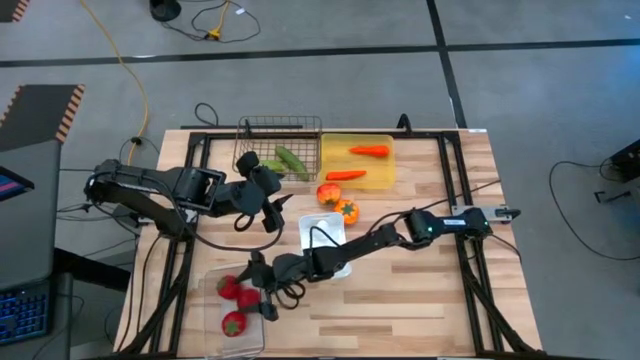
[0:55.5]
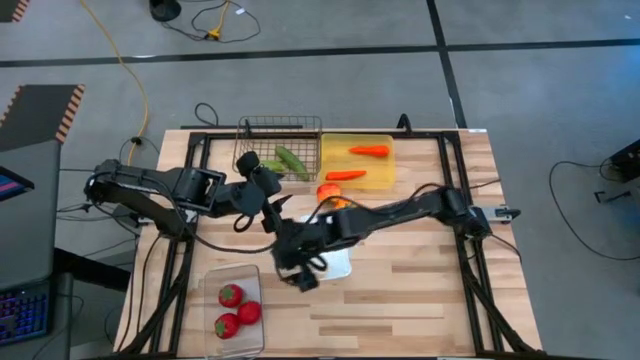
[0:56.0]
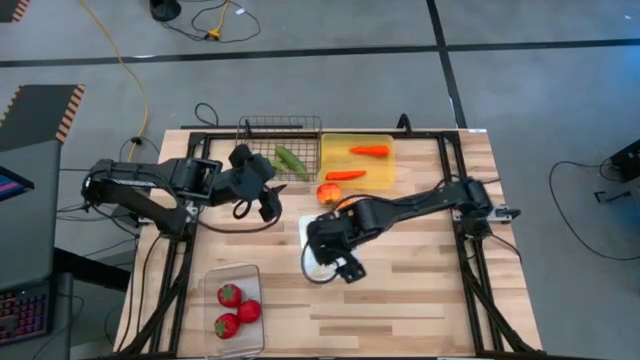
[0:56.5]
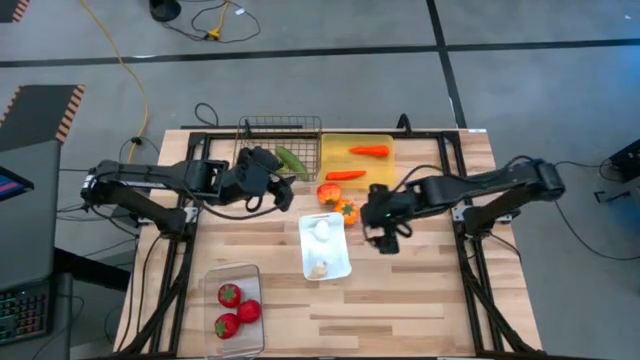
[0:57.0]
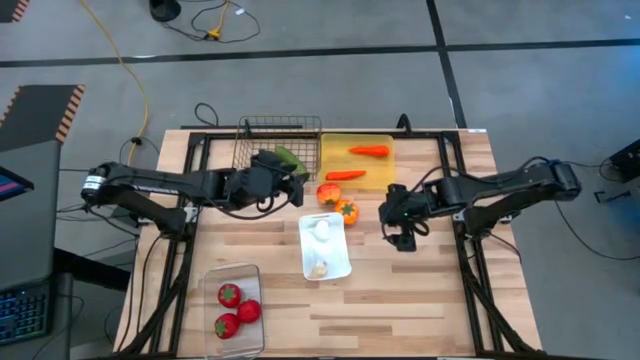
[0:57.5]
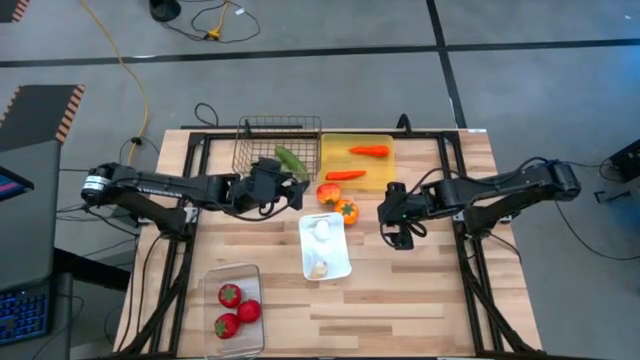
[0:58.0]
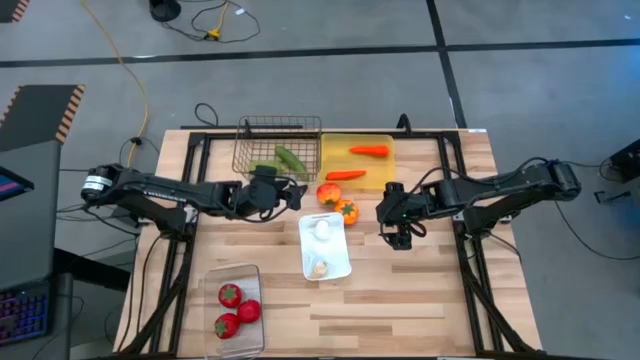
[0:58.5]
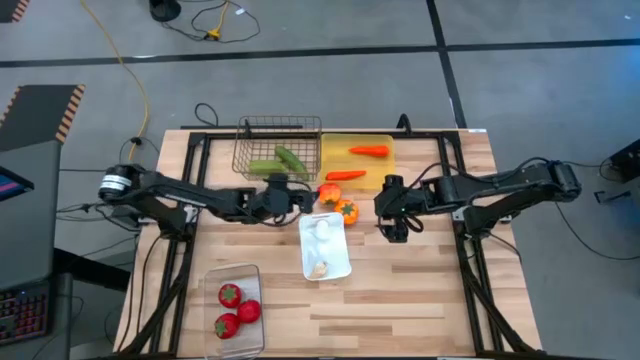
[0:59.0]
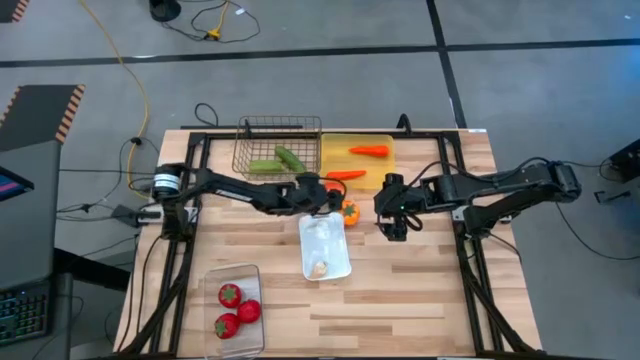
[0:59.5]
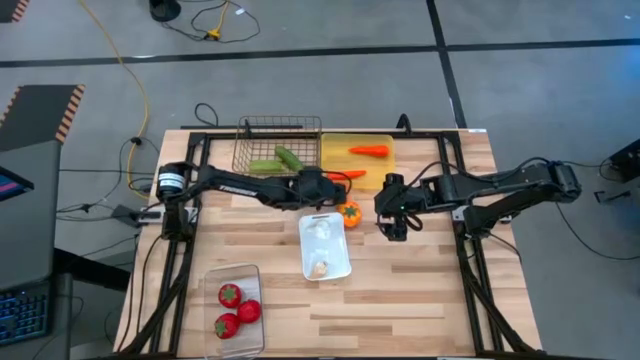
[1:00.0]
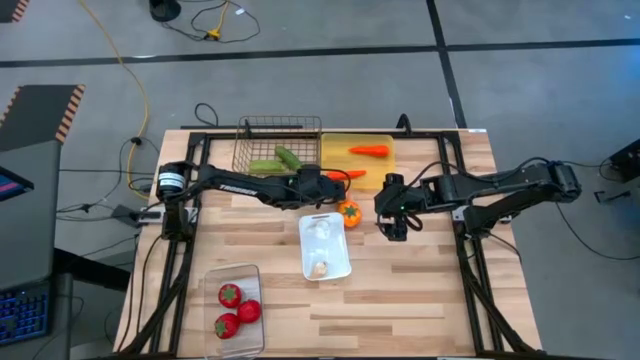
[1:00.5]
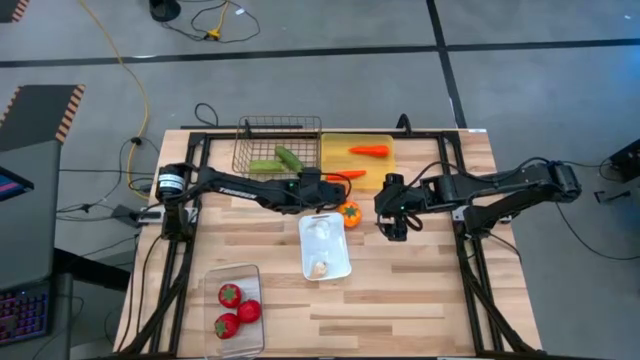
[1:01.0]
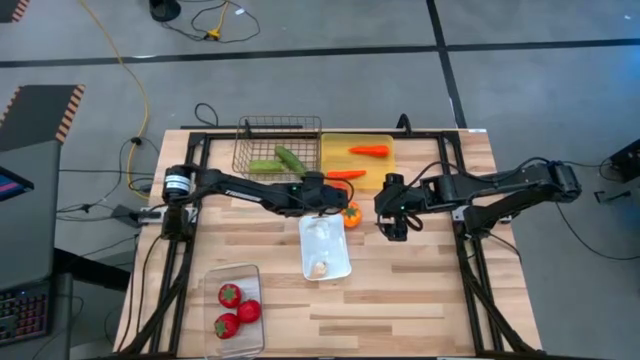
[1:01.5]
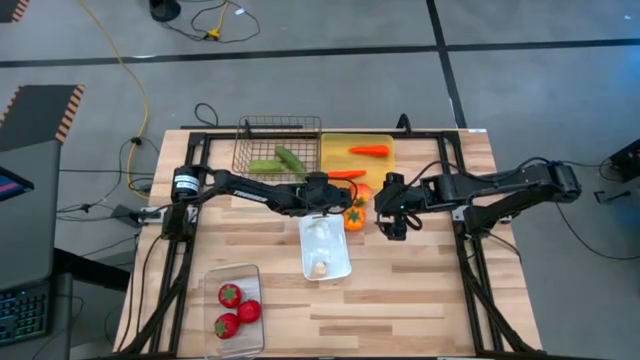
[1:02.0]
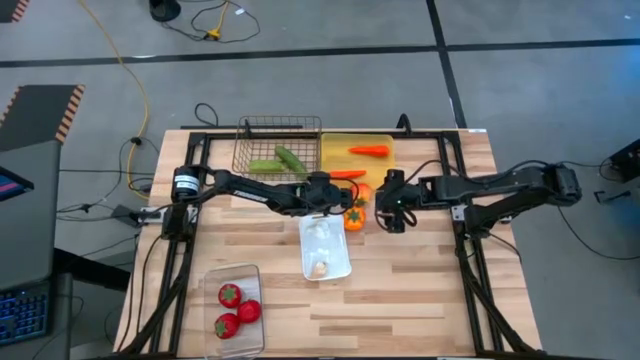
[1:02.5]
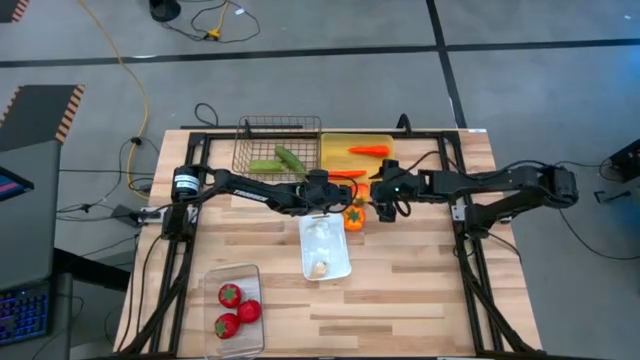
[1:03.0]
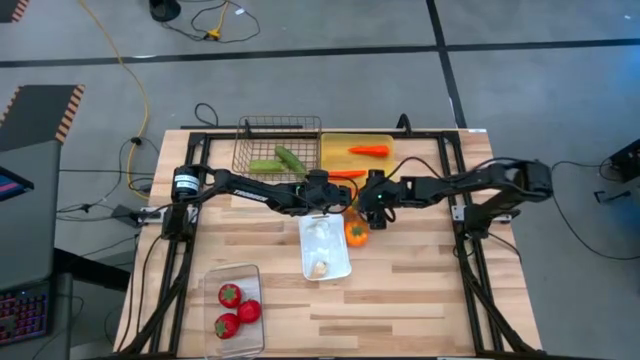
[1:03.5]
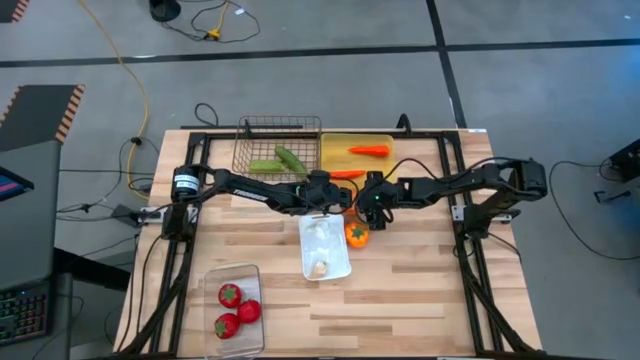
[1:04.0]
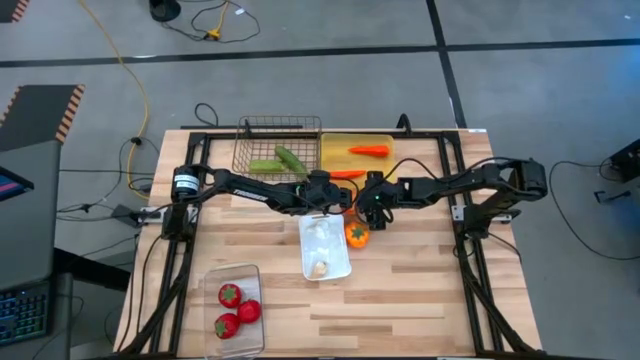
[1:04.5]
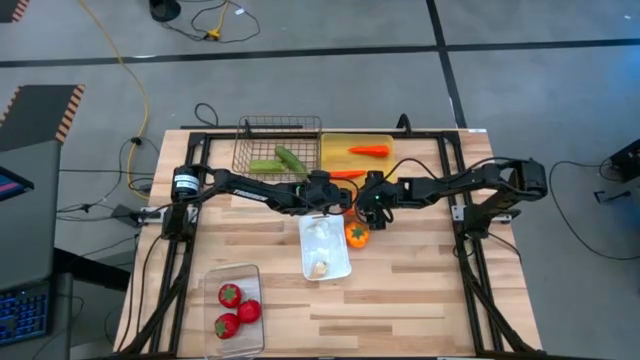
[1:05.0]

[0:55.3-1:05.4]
Task: Sort produce into baskets
Put the top orange tomato into the transparent bin

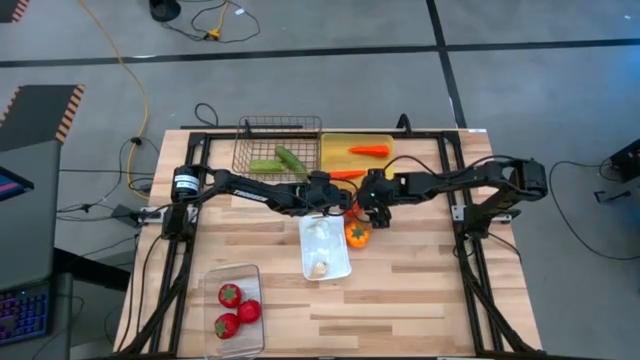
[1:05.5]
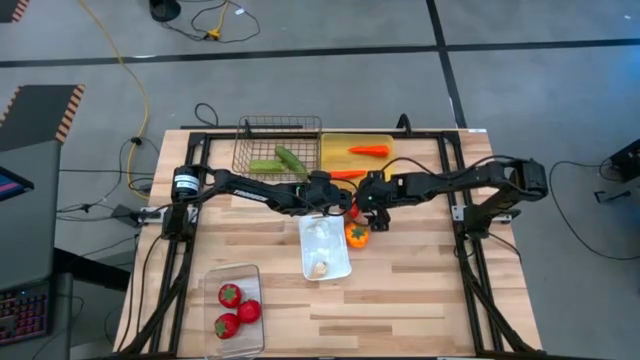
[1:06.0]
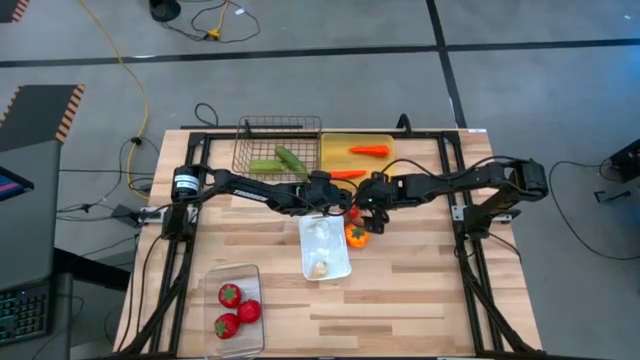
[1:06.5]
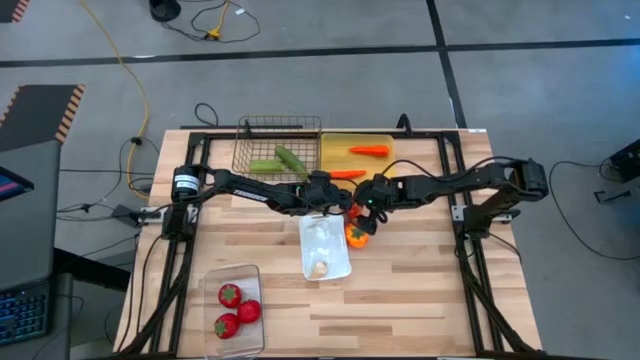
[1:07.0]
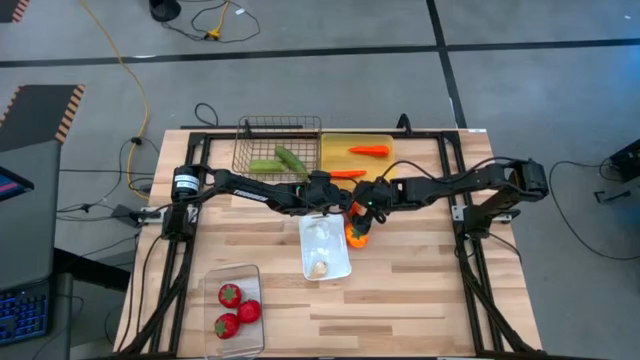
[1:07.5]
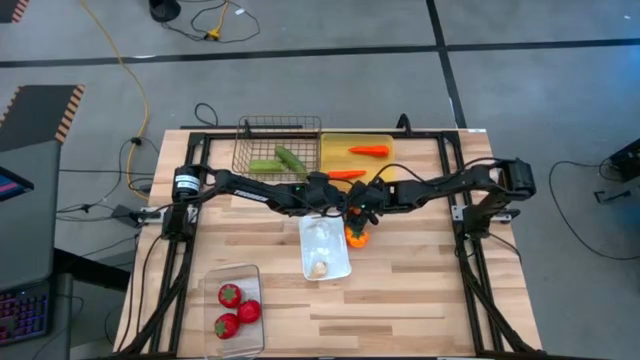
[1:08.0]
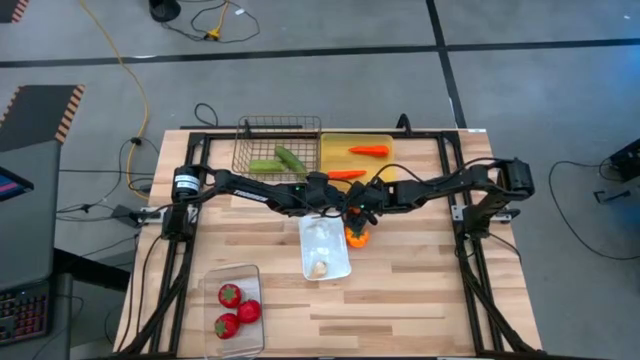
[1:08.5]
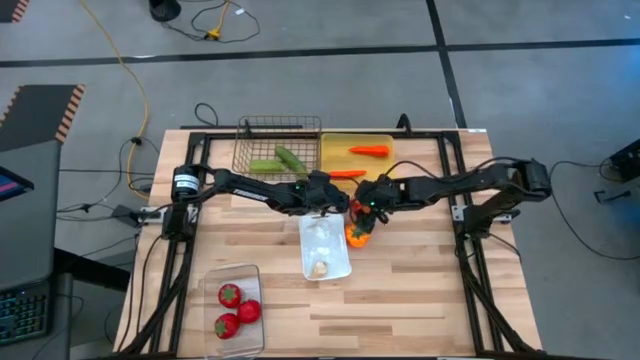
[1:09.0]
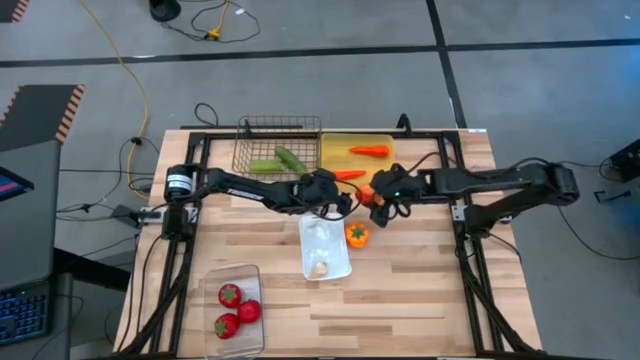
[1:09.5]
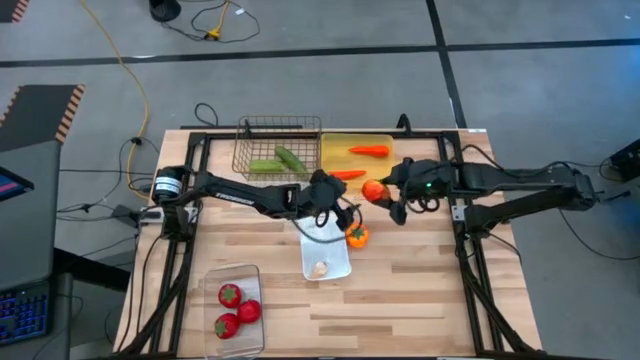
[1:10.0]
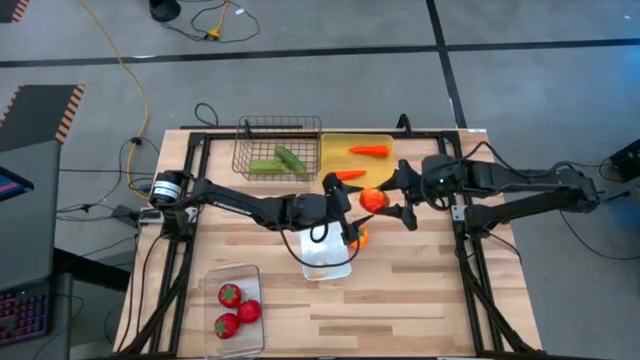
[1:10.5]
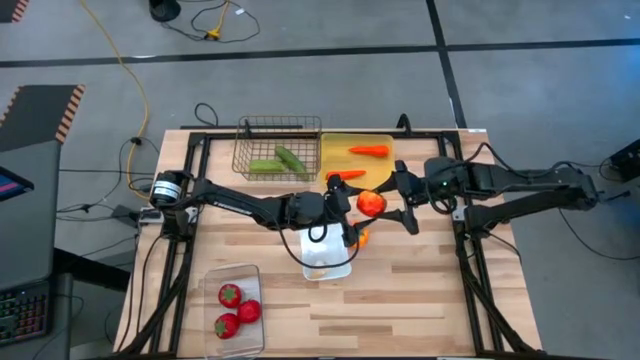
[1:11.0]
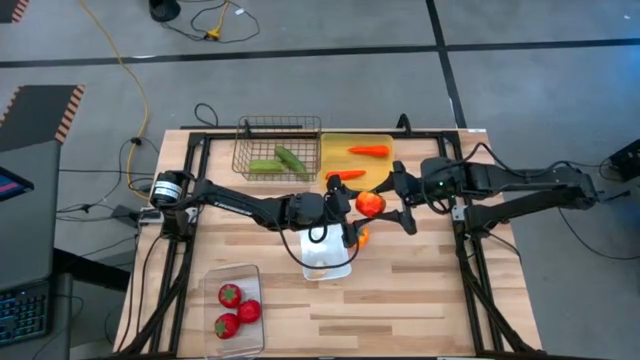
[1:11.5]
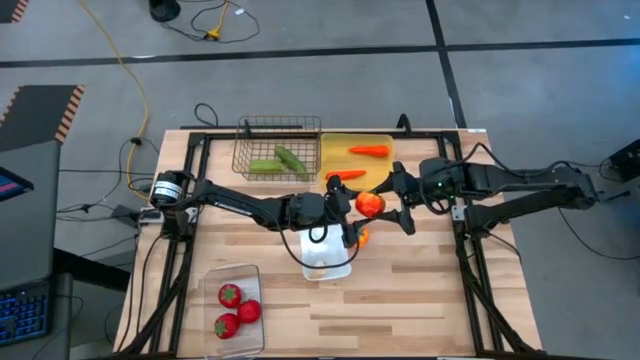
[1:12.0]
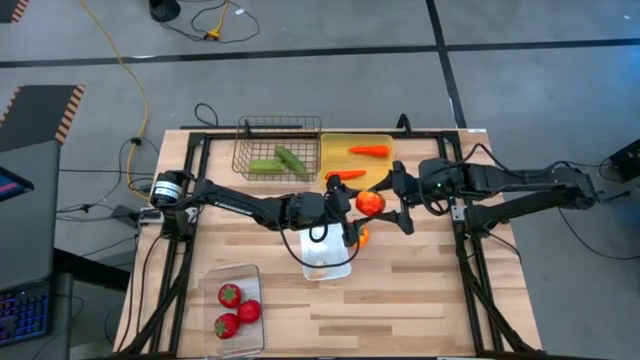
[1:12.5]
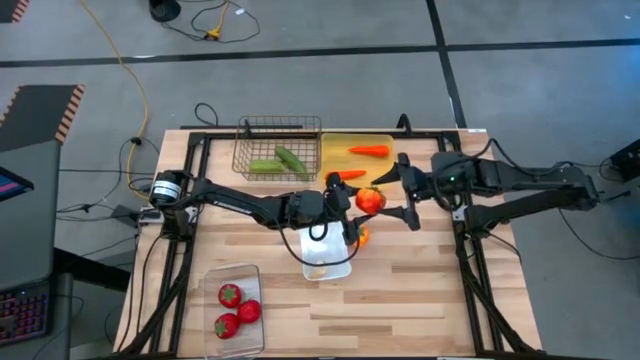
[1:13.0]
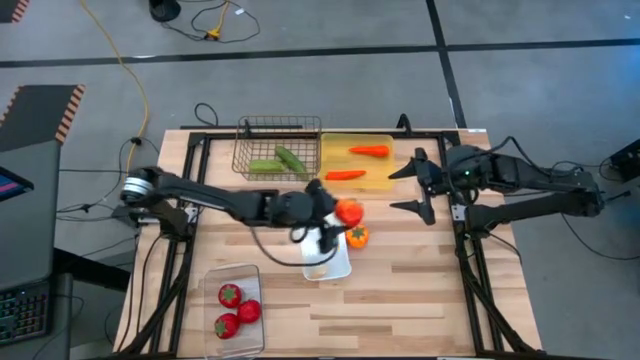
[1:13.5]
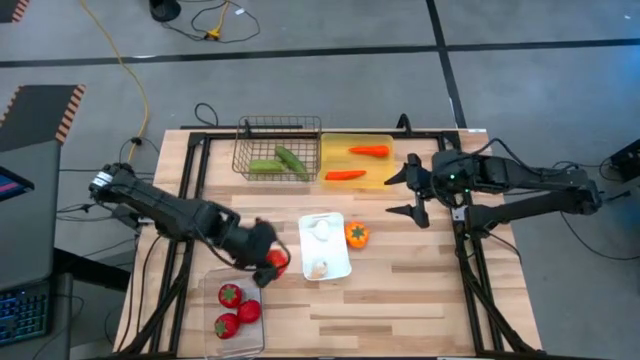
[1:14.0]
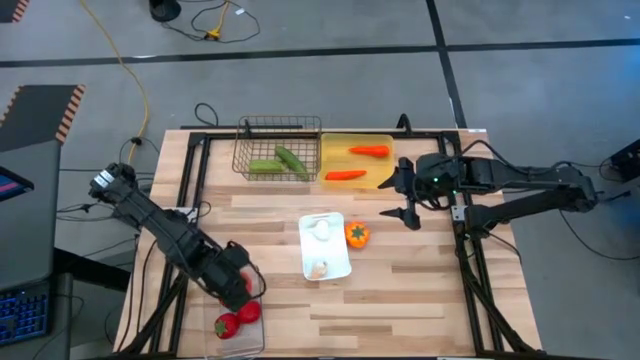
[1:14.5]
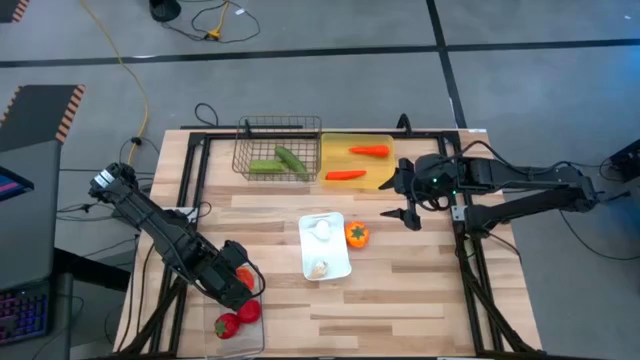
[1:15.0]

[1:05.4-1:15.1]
Put the top orange tomato into the transparent bin

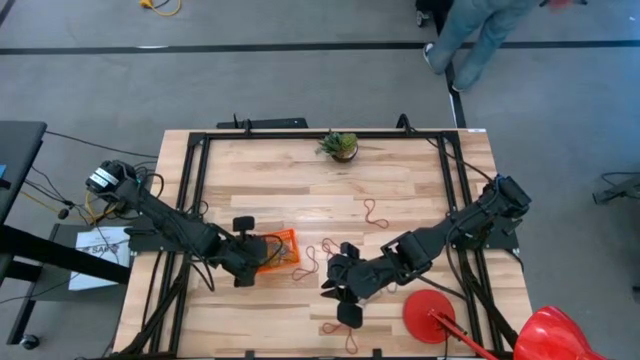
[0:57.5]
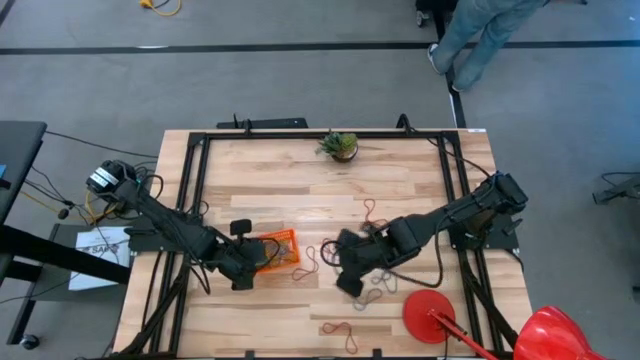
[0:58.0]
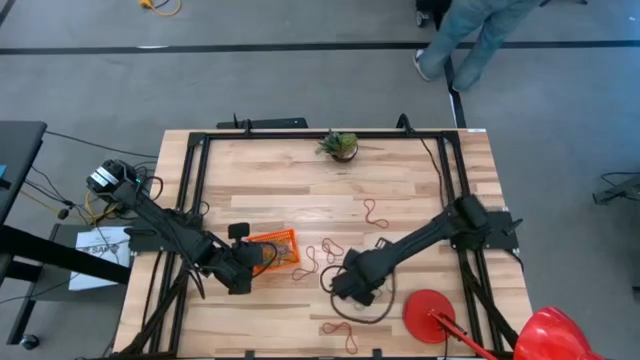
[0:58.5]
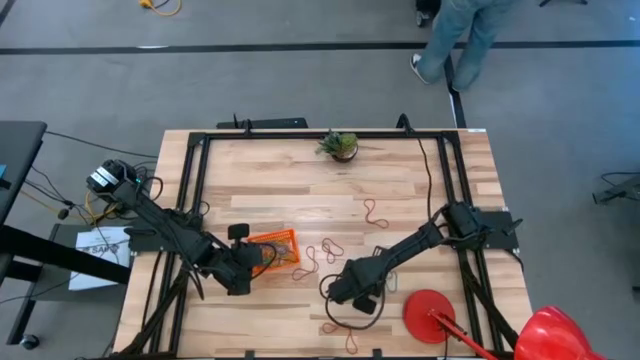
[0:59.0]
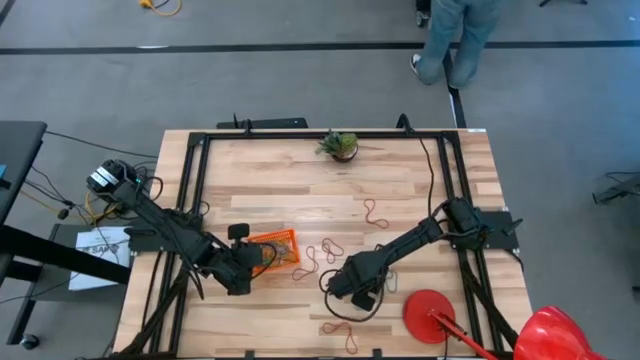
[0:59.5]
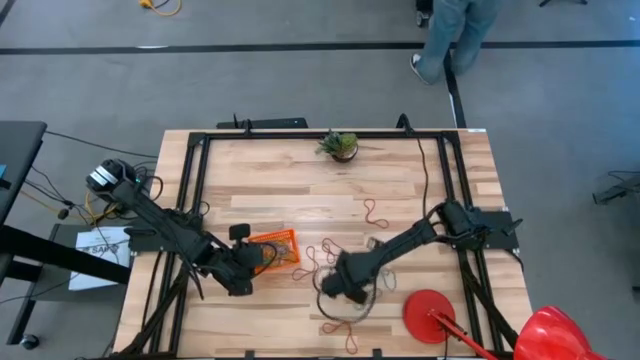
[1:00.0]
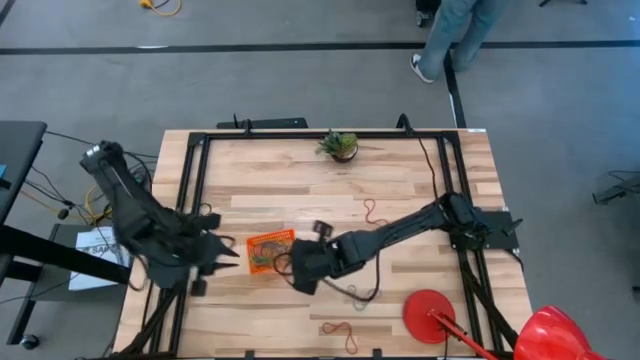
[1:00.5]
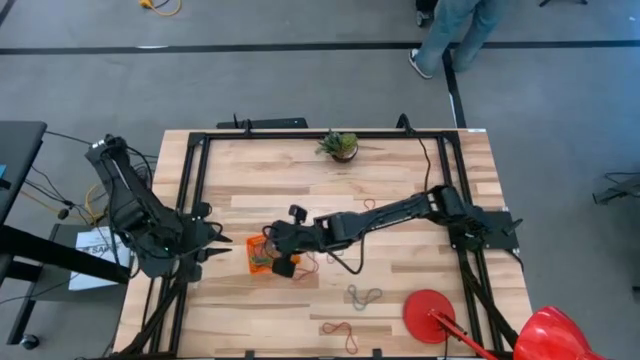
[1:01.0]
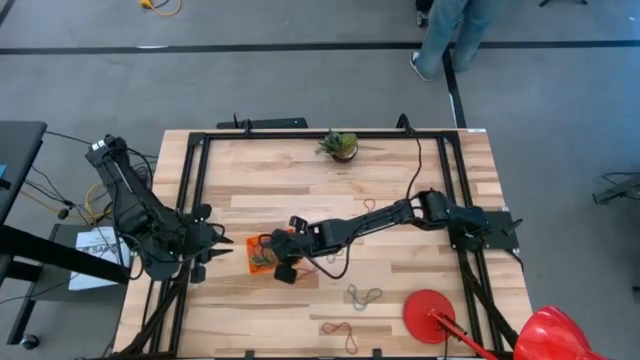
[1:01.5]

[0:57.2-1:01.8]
Task: Pick and place rubber bands into bin
Put the top blue rubber band into the orange container
